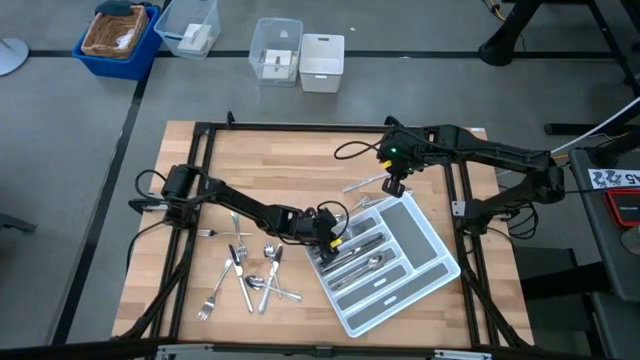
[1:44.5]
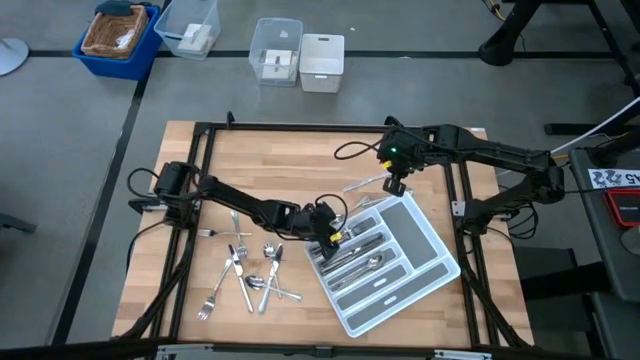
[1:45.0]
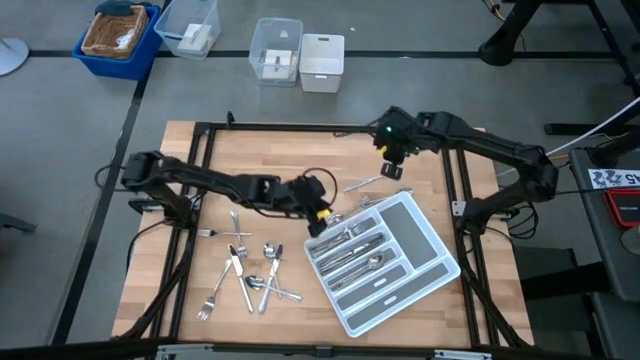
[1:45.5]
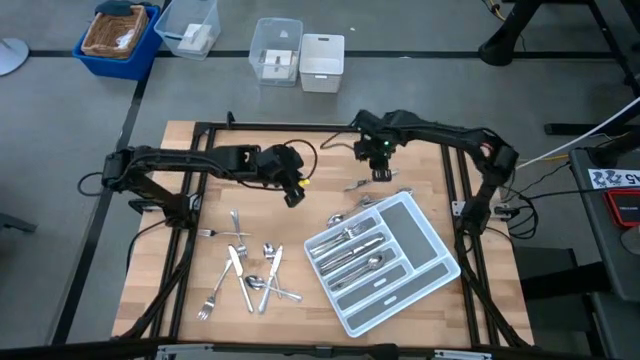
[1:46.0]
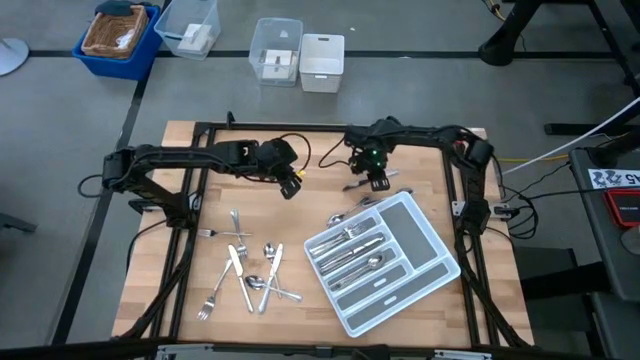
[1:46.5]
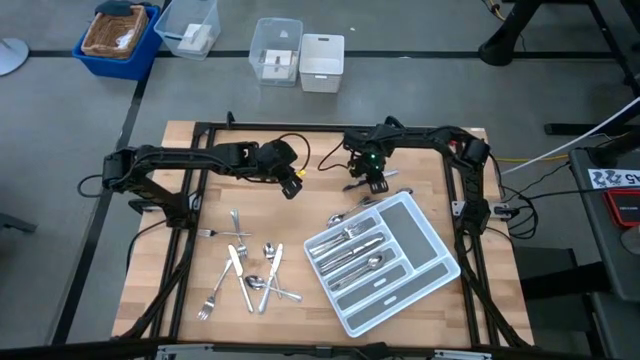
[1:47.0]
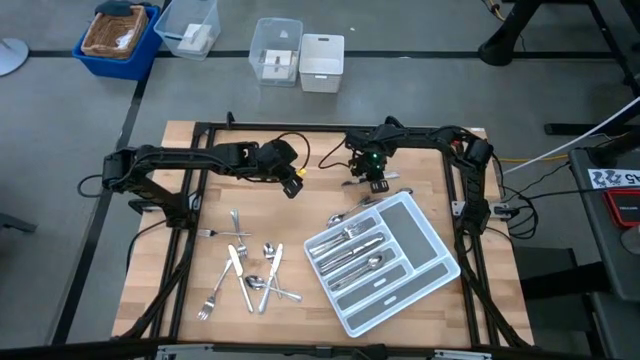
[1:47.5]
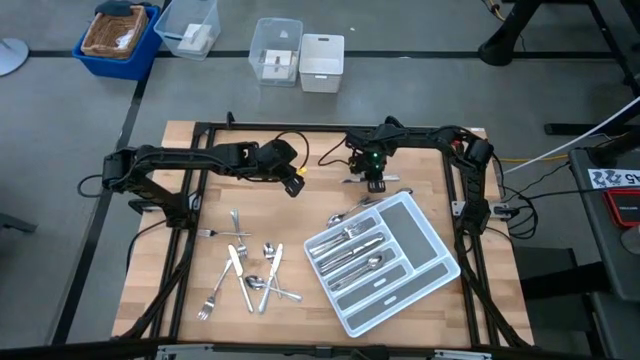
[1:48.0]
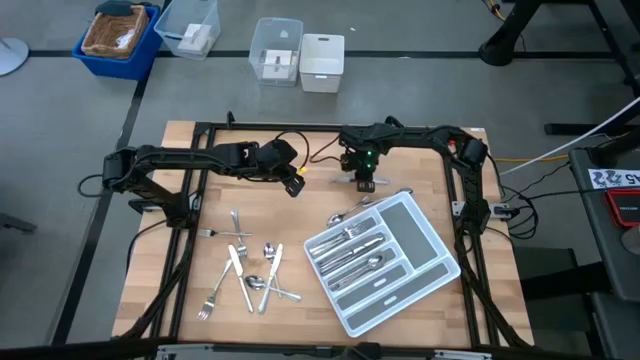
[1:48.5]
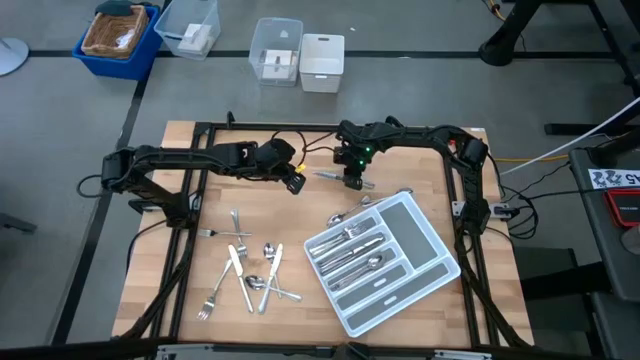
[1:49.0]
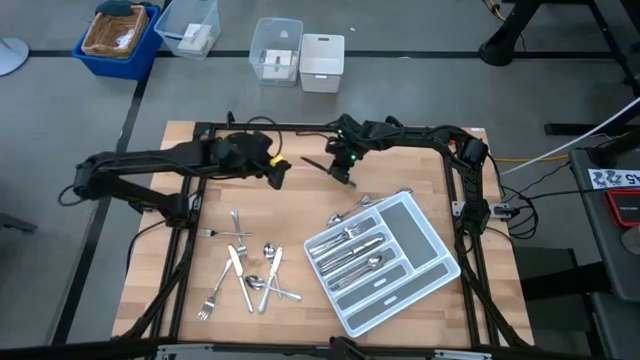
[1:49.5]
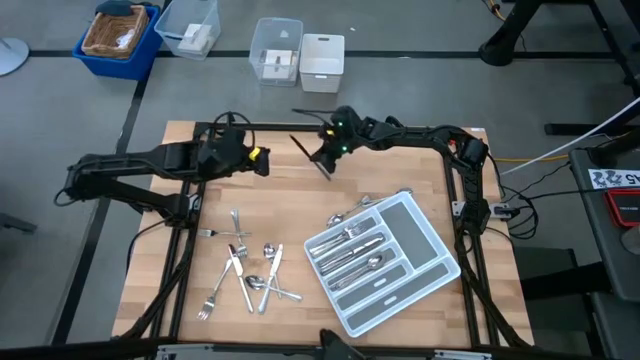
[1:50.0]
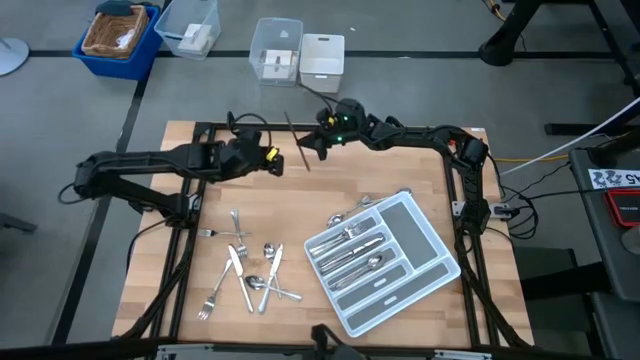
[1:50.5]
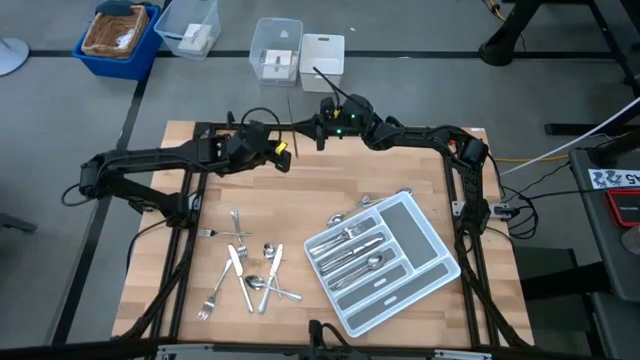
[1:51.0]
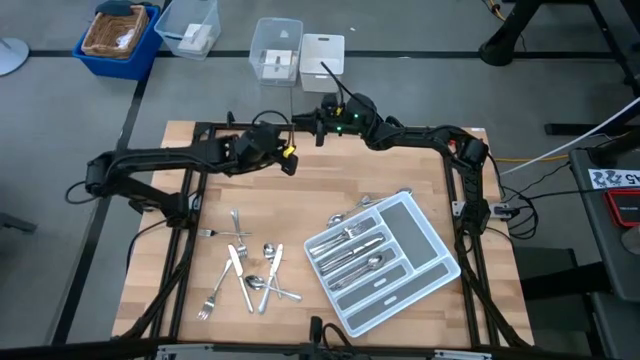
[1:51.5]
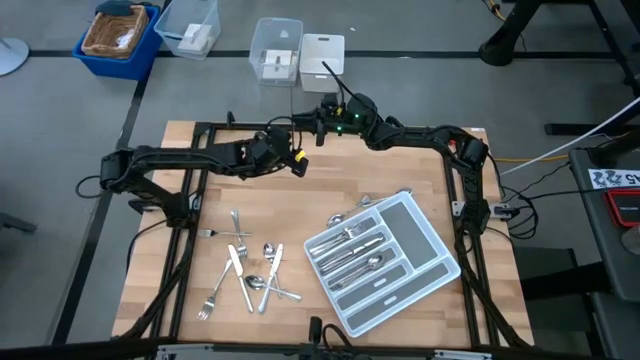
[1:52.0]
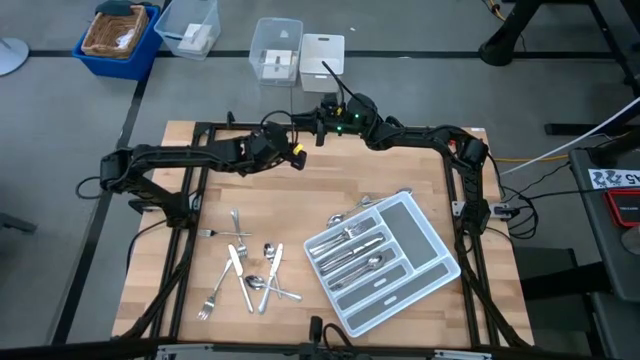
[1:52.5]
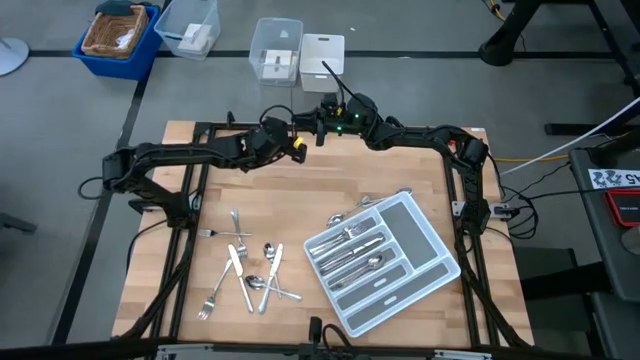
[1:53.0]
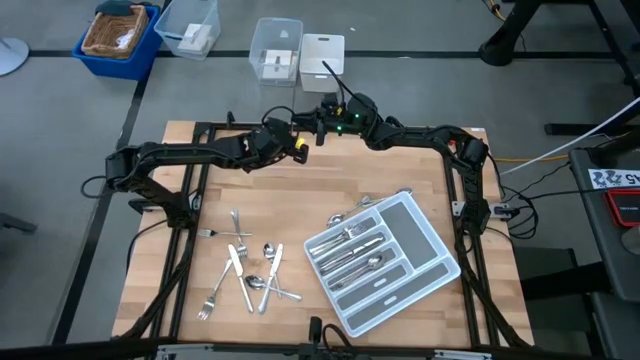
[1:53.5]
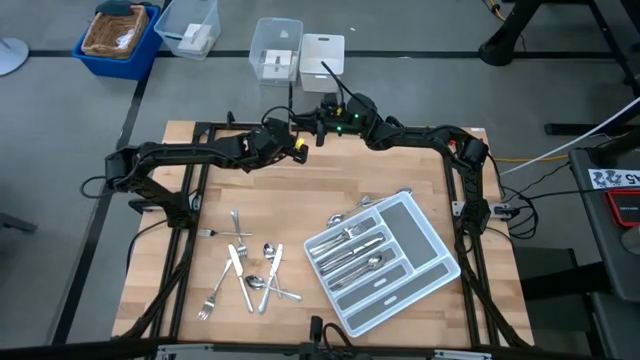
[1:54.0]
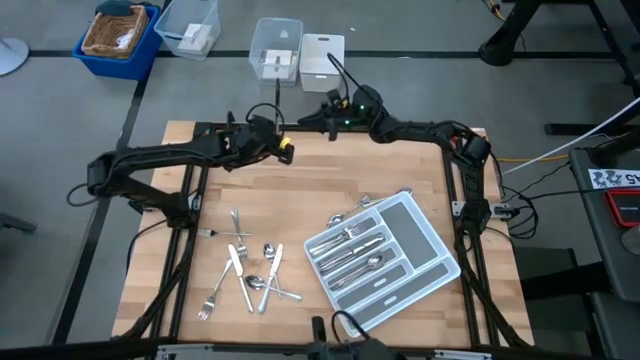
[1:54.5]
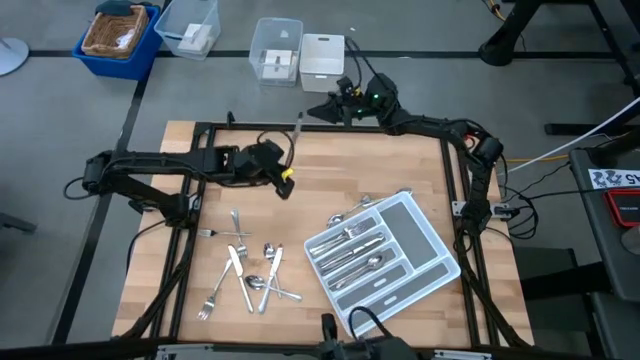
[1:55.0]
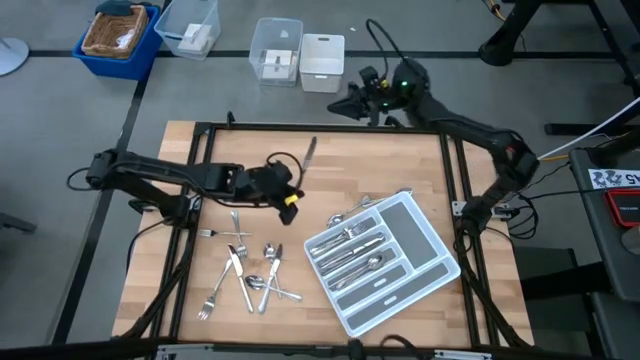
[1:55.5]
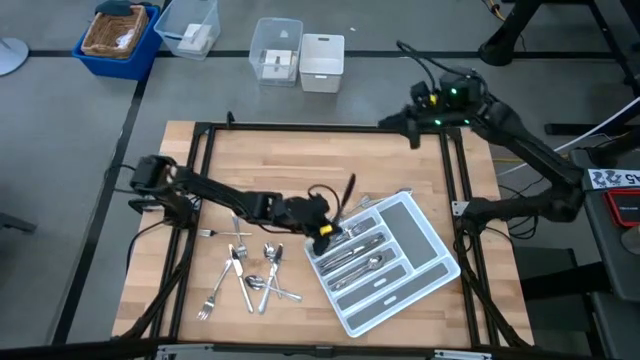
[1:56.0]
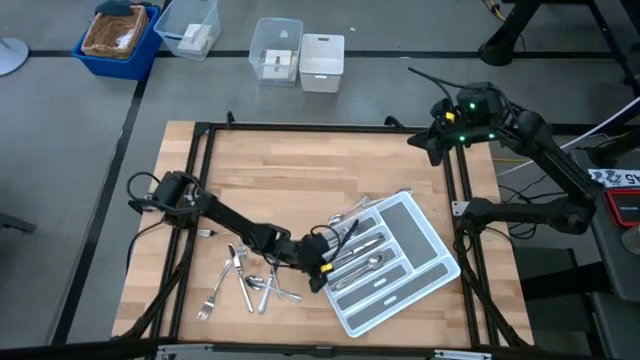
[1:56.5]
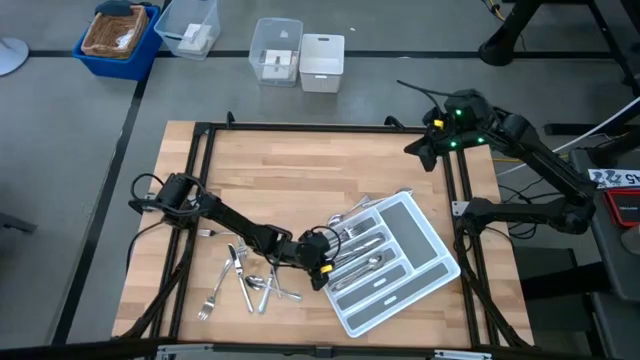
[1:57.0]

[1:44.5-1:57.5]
Task: Sort silverware
Put the silver table knife into the silverware tray

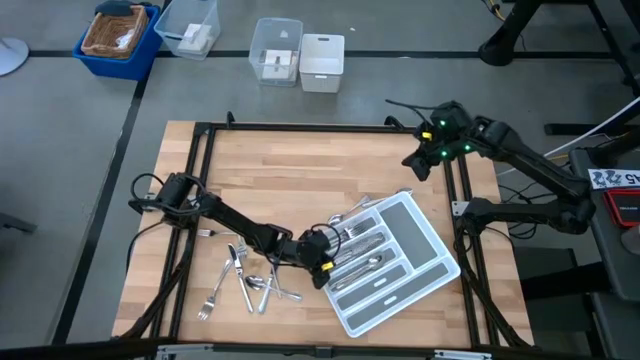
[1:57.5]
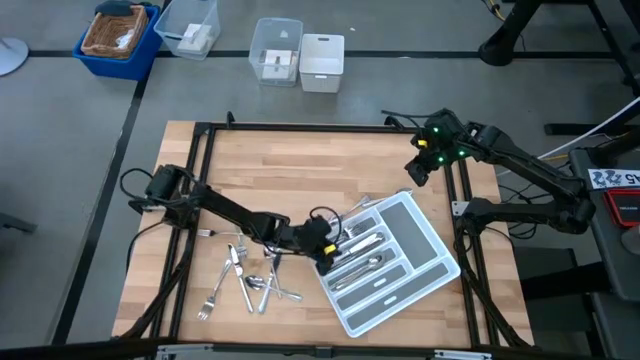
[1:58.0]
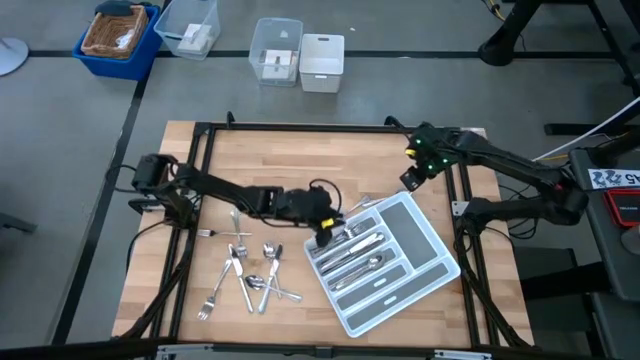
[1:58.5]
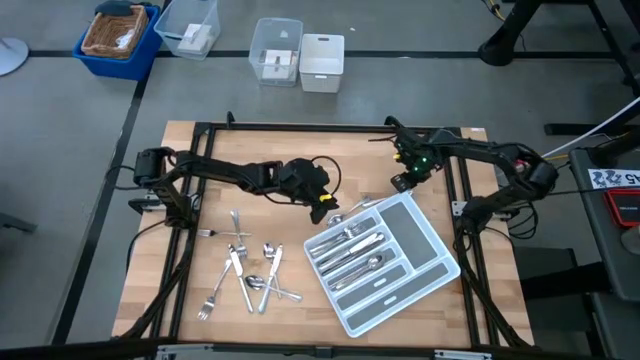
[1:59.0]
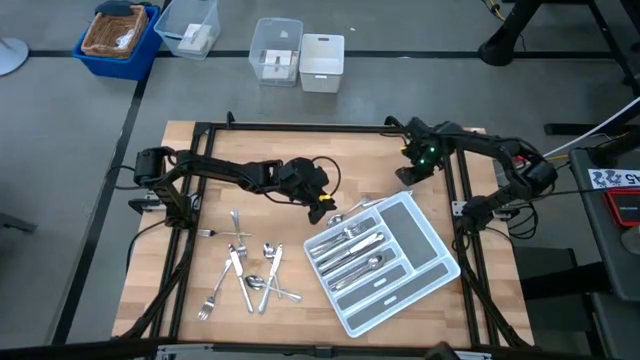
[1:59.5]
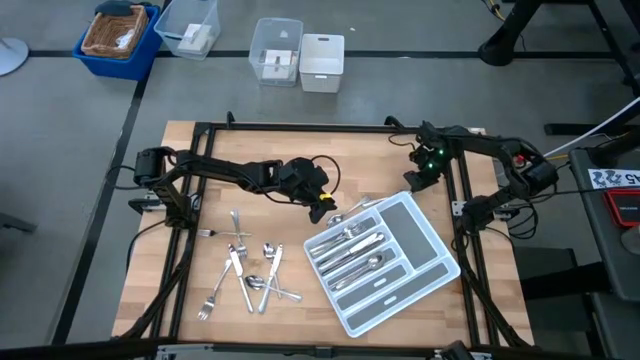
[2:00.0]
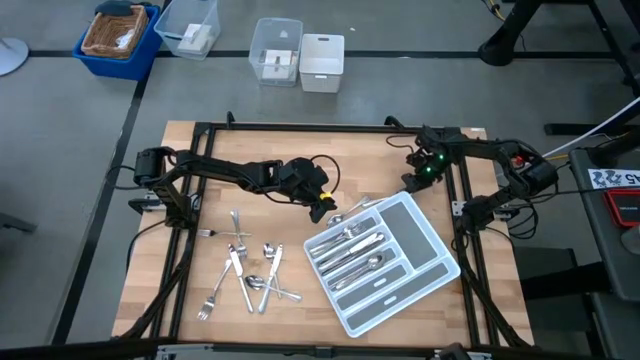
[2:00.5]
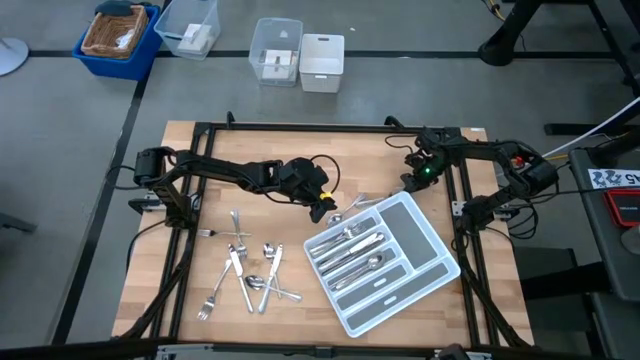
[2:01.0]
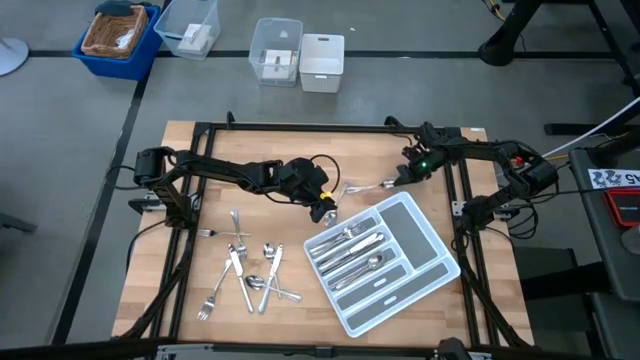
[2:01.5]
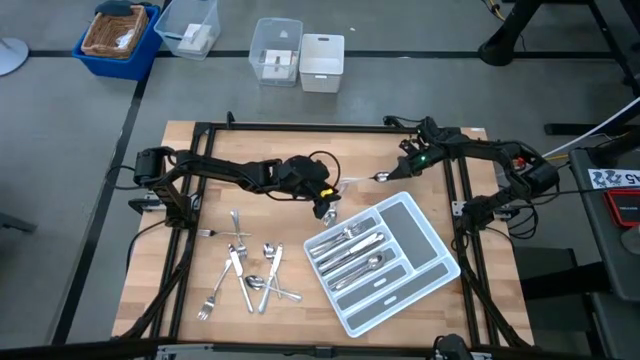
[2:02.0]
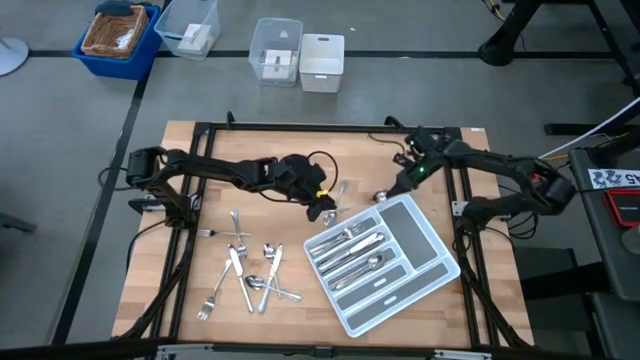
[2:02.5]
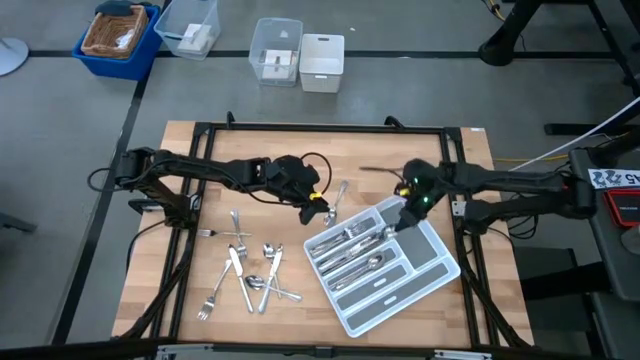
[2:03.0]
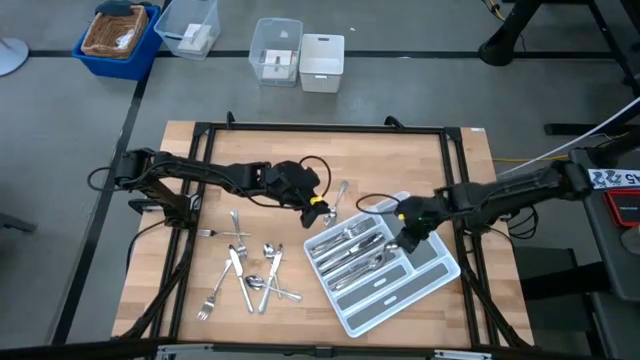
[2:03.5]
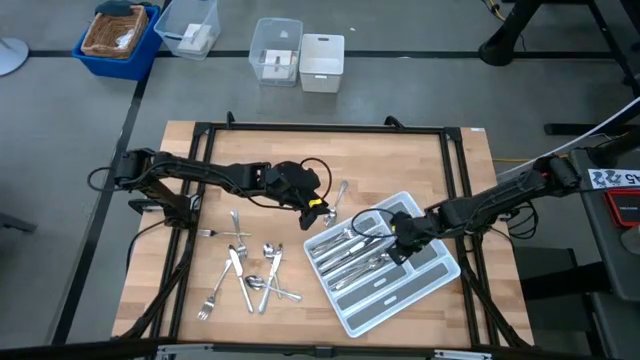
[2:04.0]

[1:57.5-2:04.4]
Put the silver spoon into the silverware tray

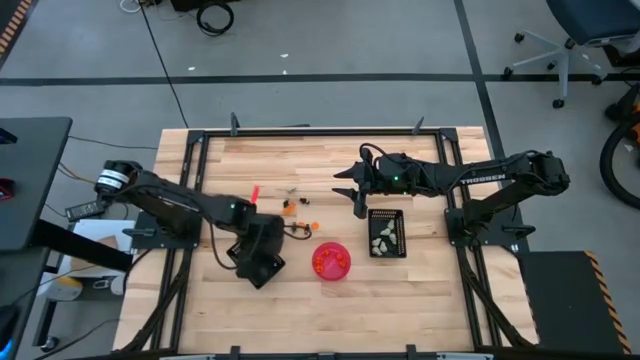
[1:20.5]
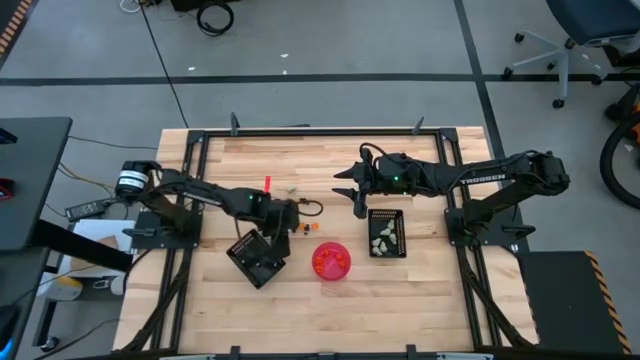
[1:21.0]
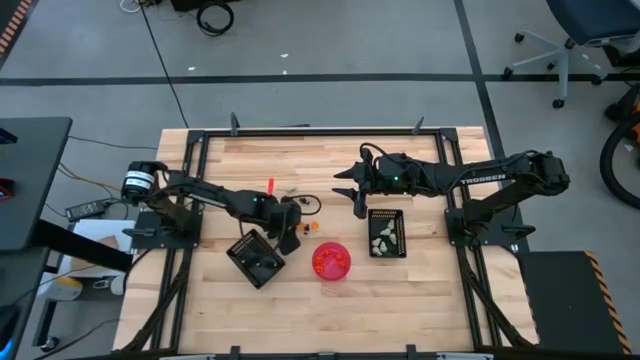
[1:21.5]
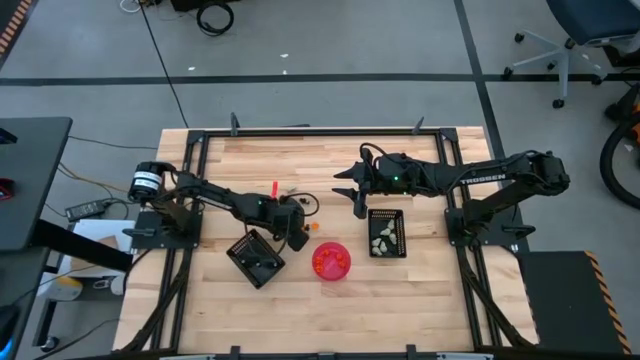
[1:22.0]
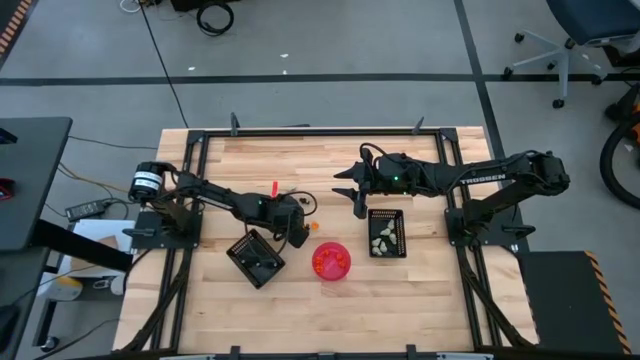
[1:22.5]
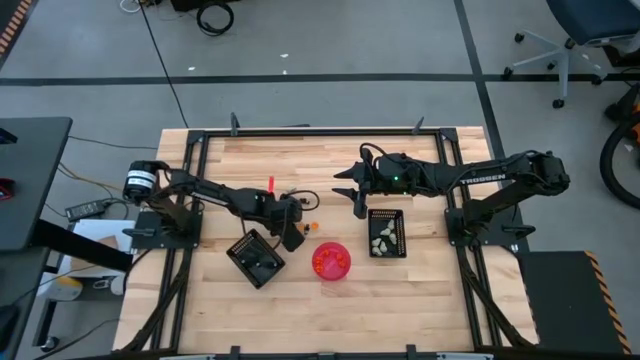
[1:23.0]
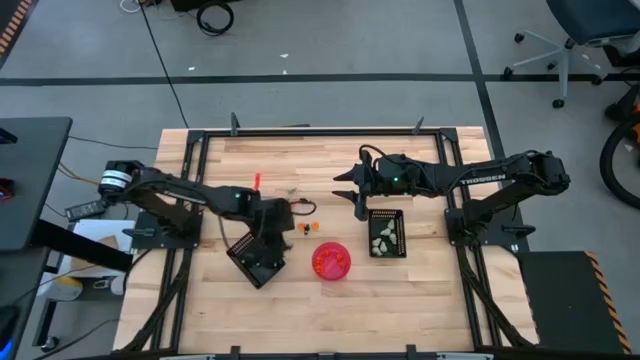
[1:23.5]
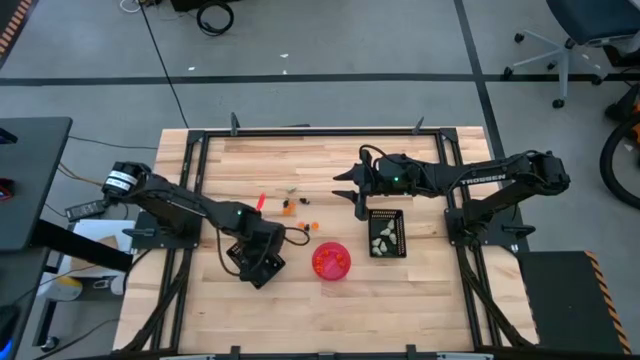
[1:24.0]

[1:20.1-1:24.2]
Task: Sort Halloween decoration
Put the black skeleton toy into the bottom black bin
